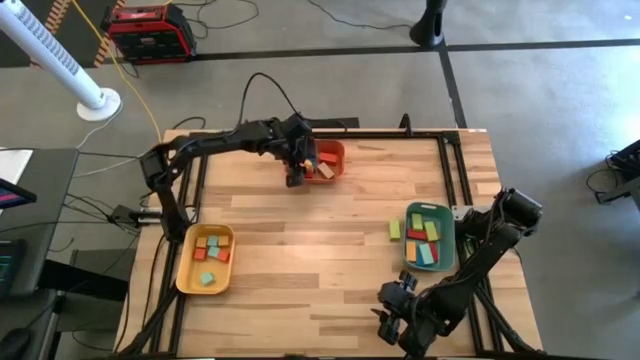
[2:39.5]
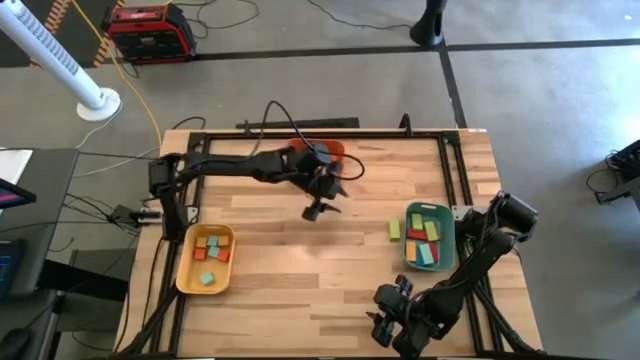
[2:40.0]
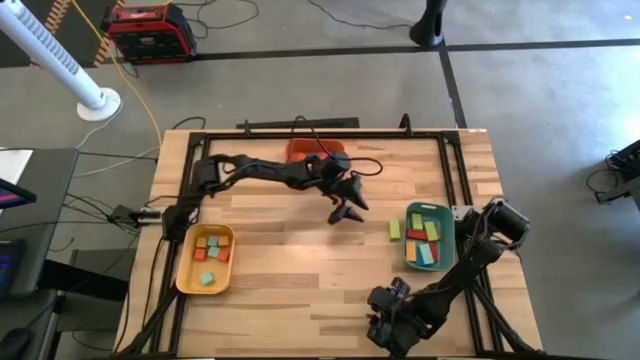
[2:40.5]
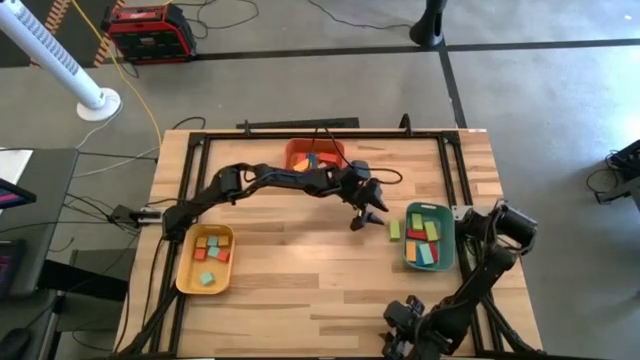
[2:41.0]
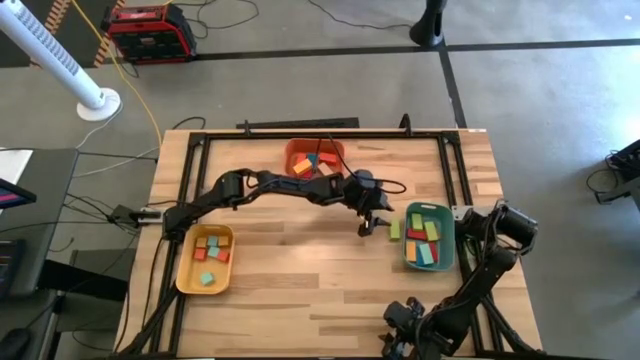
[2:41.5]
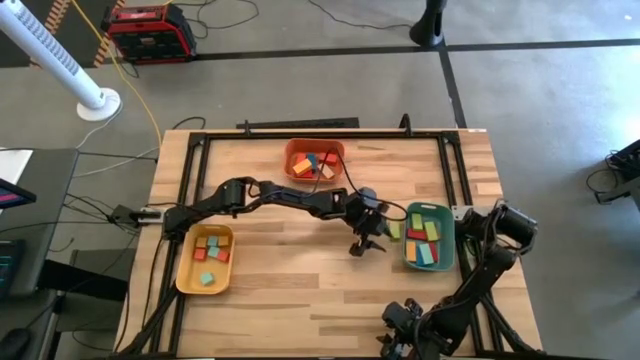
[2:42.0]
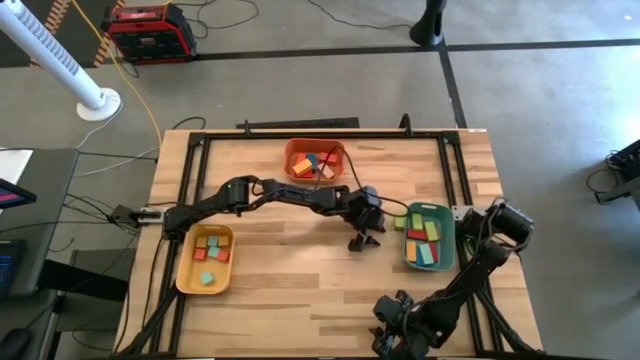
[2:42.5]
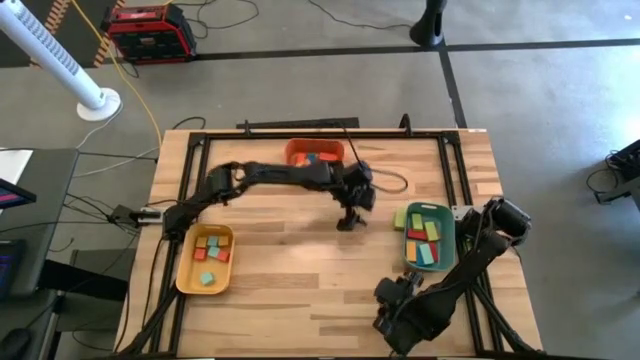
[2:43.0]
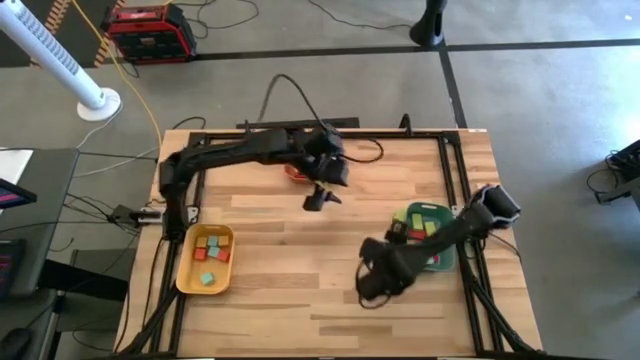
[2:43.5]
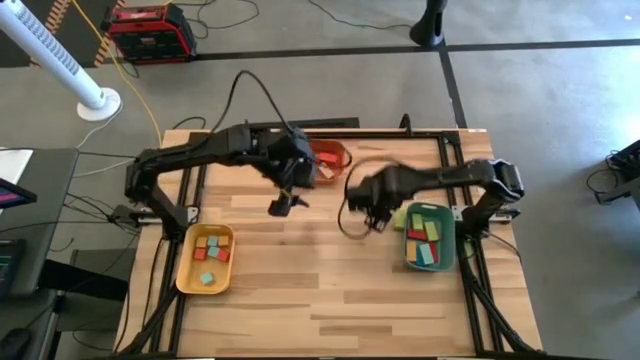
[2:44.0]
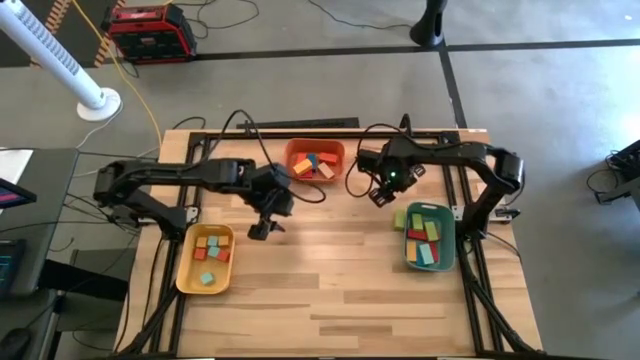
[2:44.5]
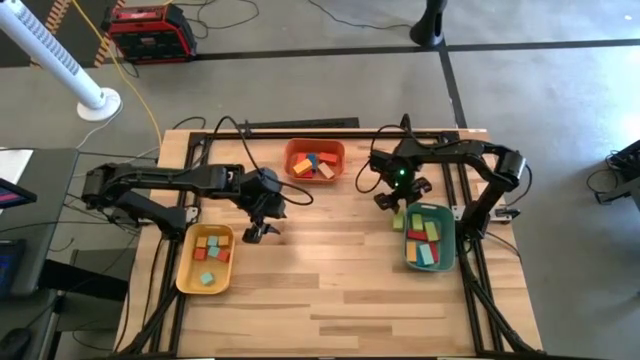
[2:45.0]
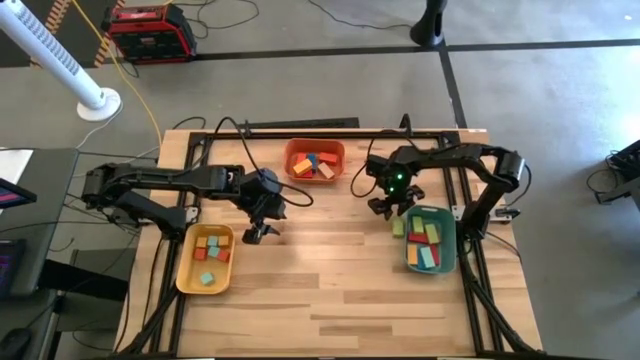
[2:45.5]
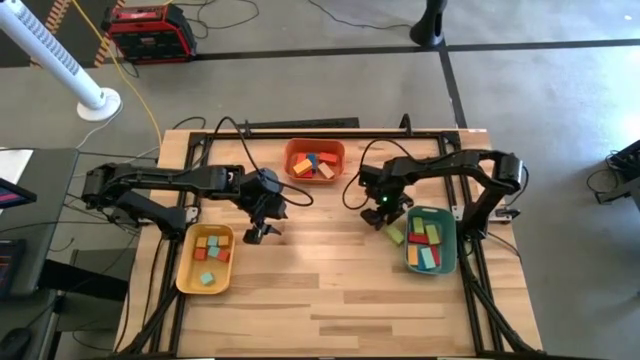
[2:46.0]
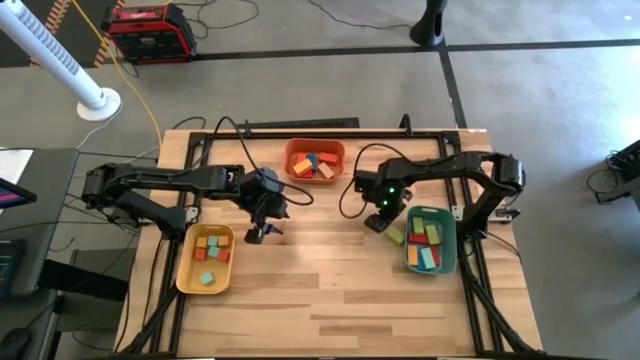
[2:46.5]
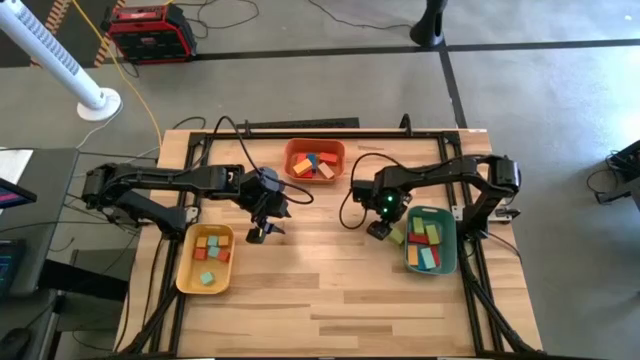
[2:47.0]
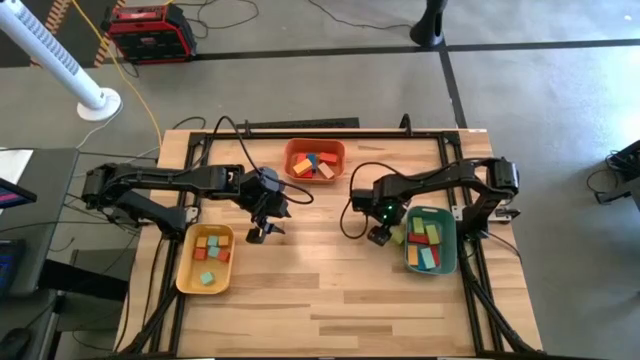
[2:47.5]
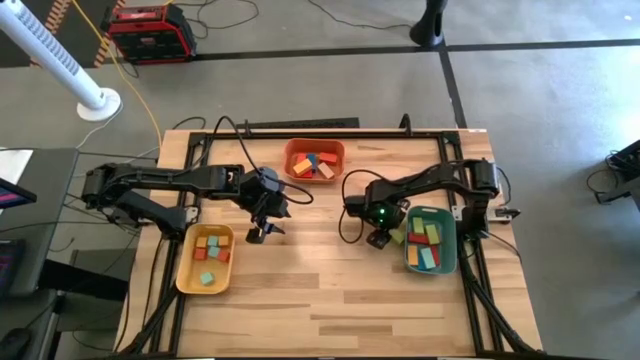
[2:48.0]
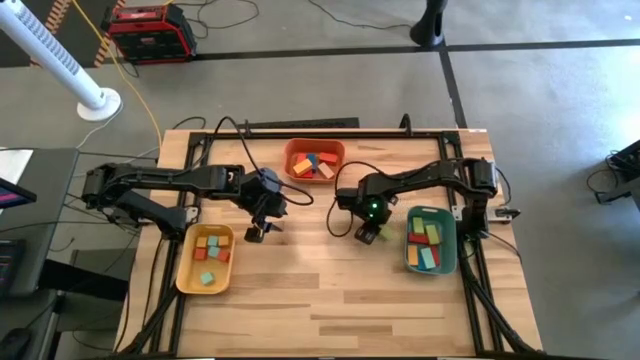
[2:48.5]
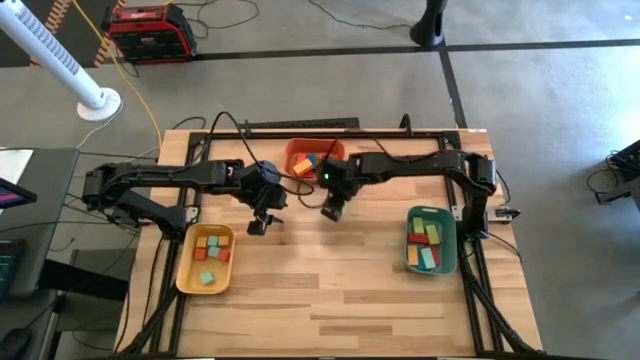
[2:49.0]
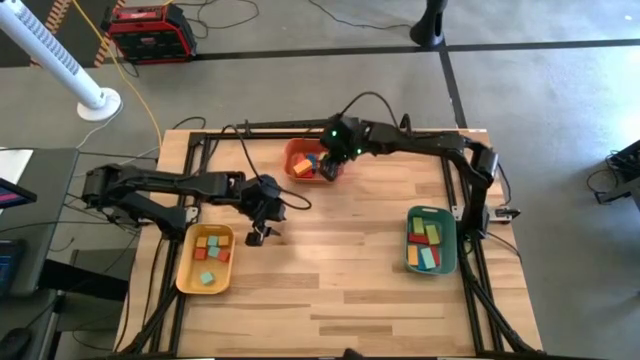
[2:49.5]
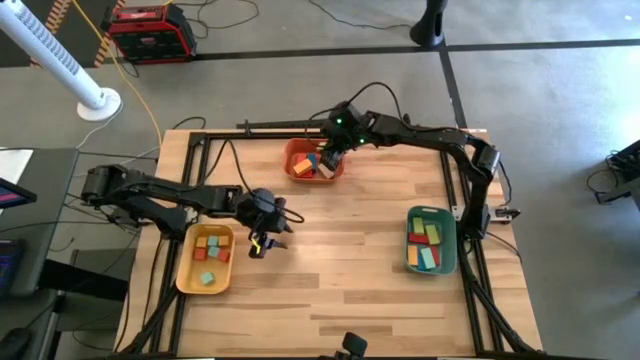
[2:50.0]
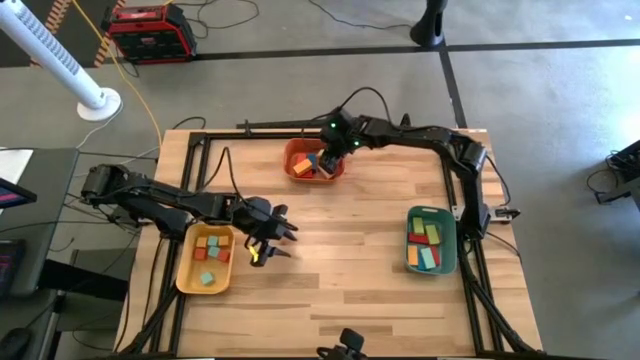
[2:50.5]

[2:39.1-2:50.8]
Task: Sort blocks by size
Put the large light green block into the orange bin

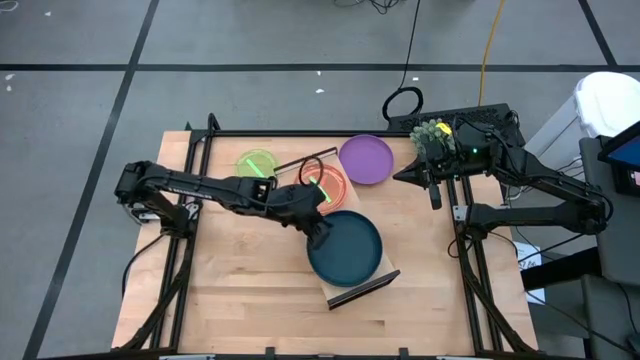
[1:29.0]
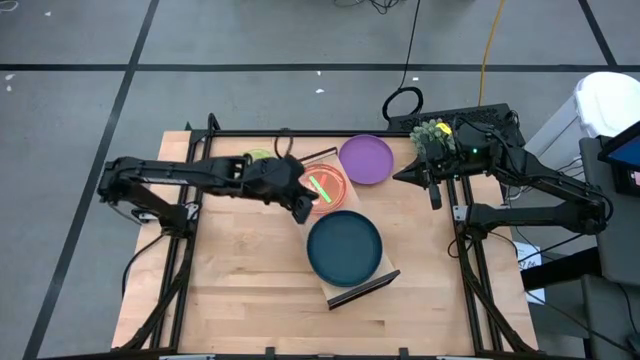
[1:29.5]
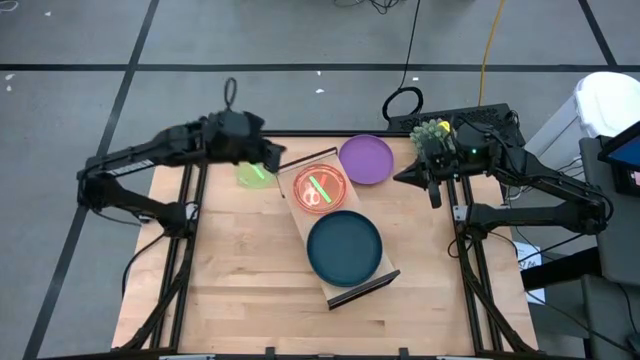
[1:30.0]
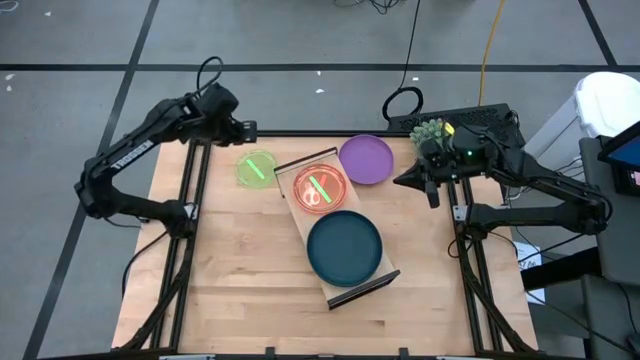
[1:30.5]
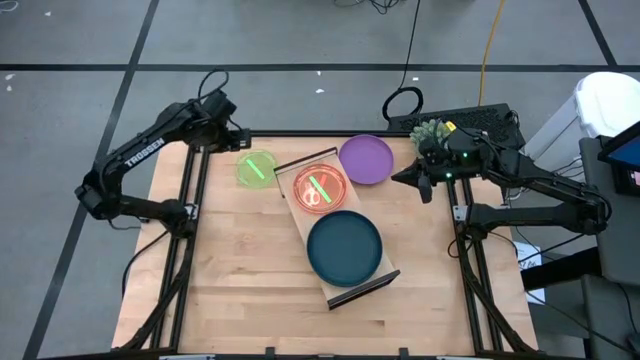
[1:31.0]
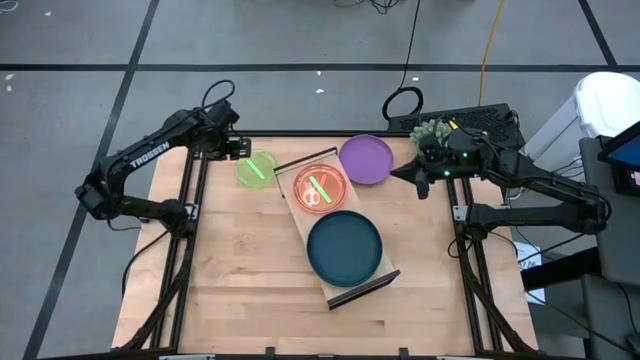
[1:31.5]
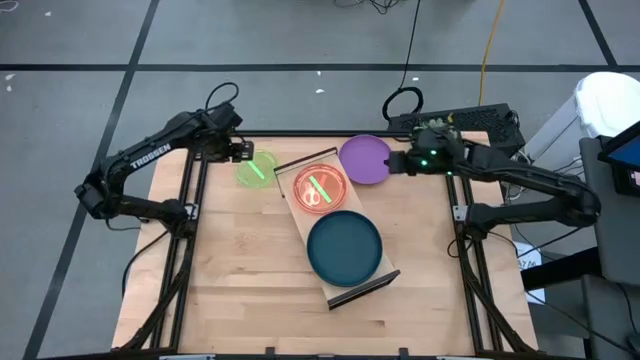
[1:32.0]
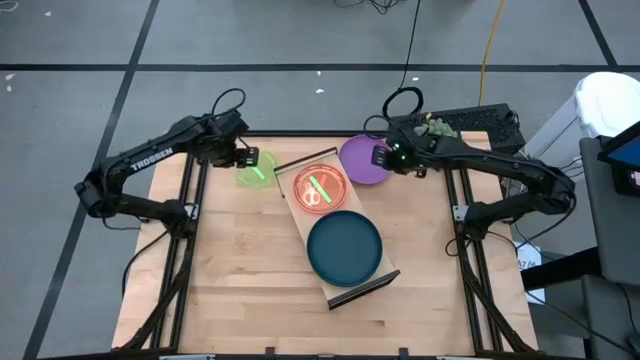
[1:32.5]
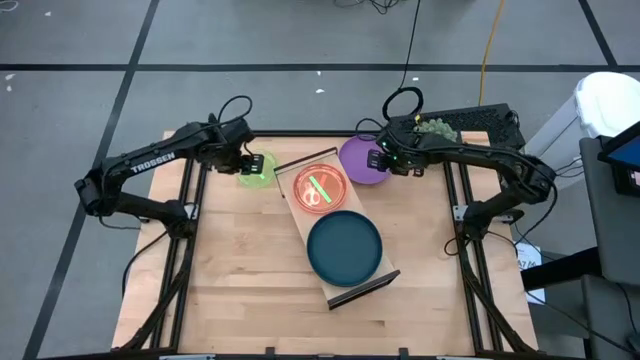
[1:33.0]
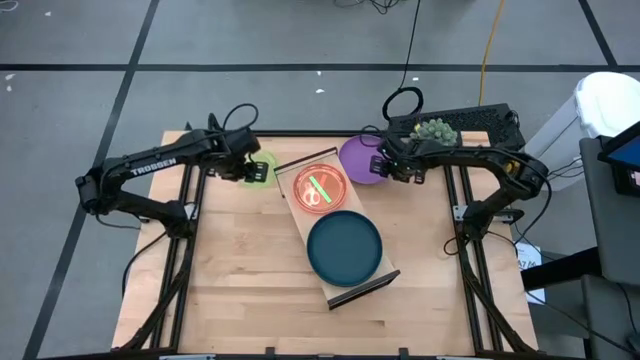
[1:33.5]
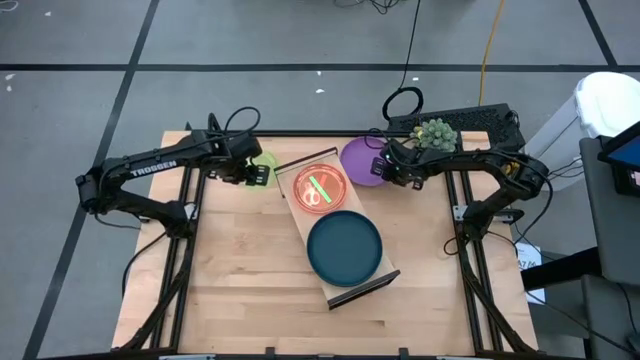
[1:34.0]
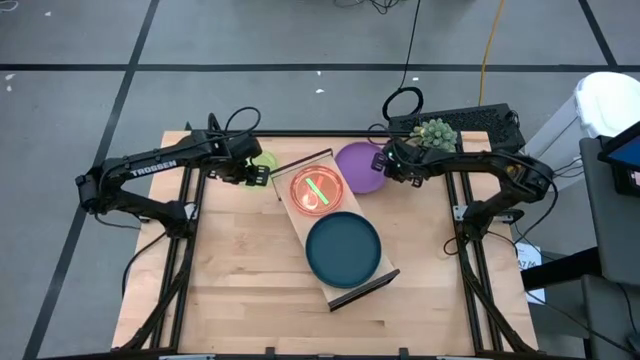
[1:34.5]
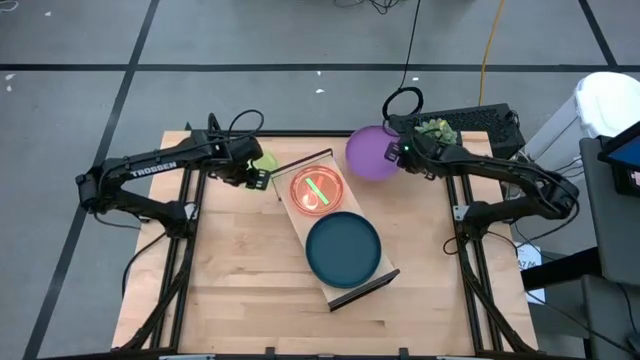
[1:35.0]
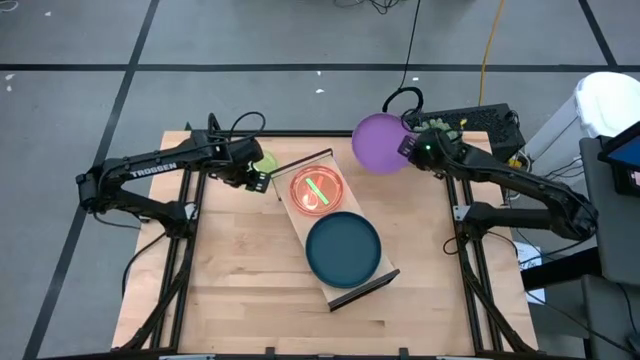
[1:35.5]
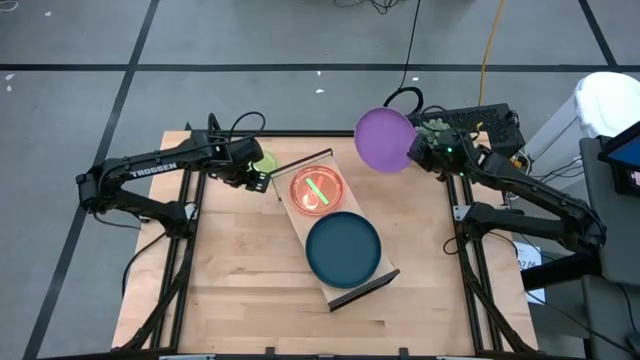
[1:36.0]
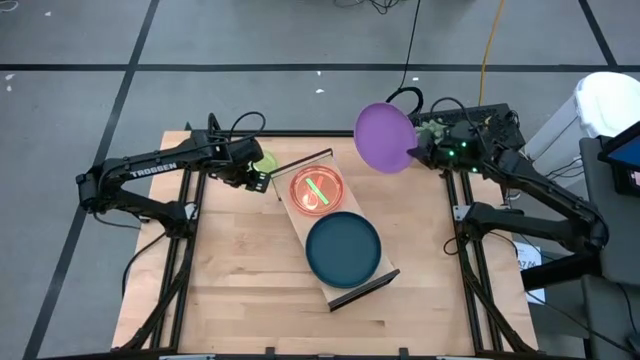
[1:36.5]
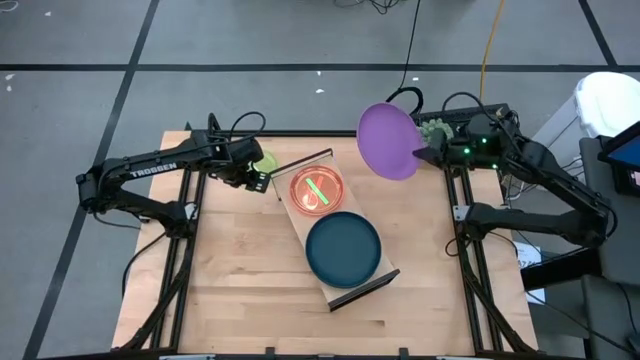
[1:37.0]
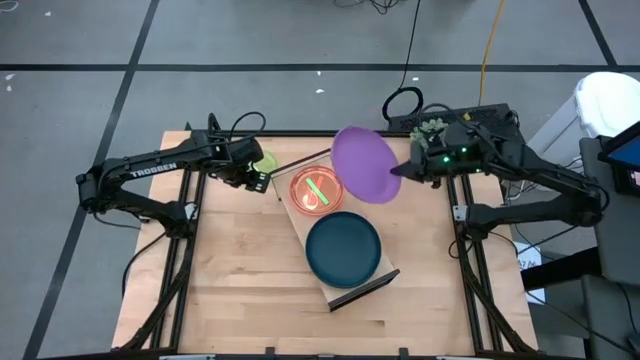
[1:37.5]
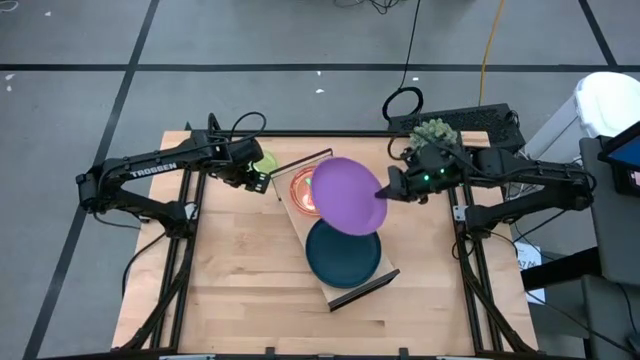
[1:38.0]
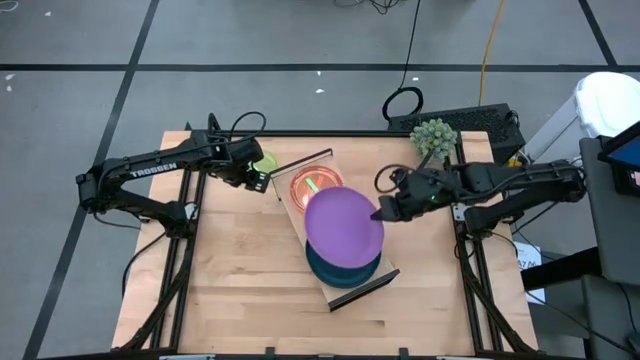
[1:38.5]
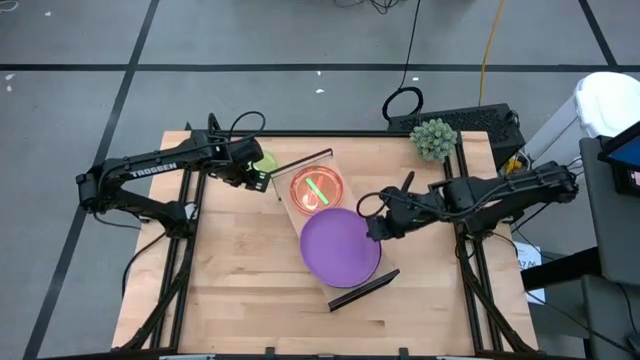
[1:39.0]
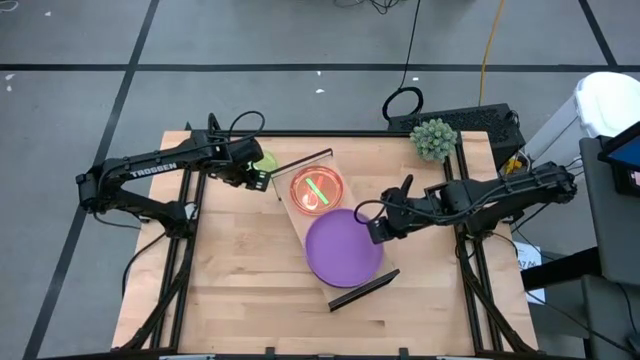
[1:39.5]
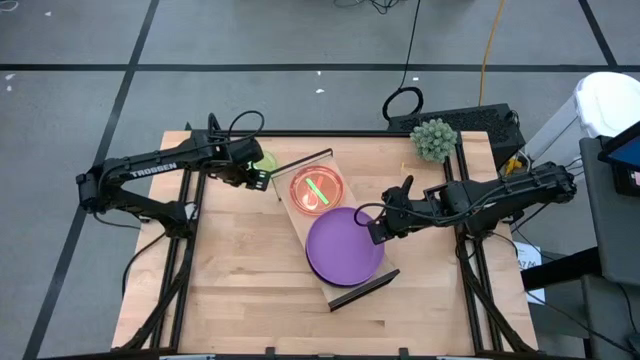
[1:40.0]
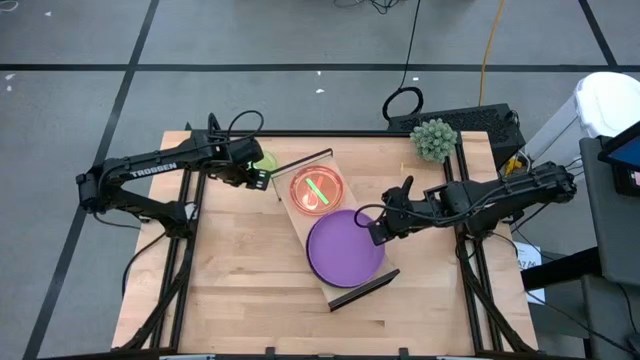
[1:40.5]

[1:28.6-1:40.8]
Task: Place and stack plates onto a shelf
Stack the purple plate on top of the black plate on the shelf
